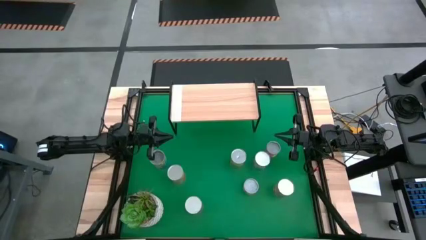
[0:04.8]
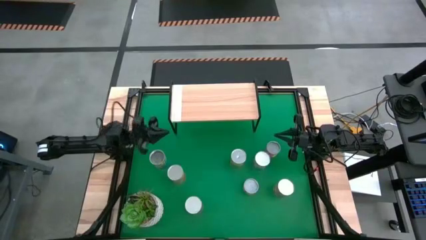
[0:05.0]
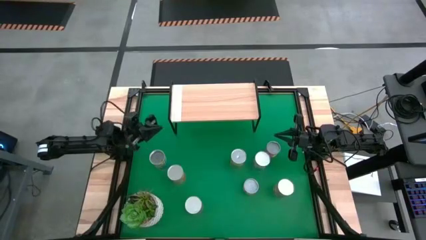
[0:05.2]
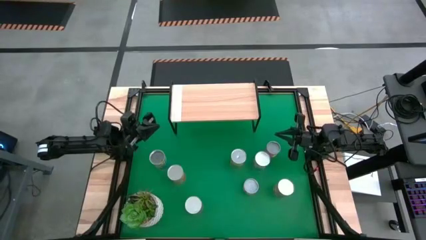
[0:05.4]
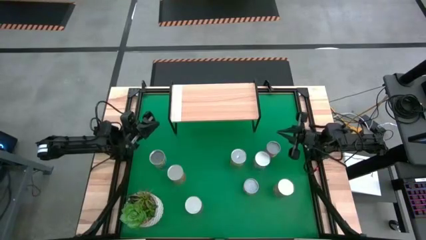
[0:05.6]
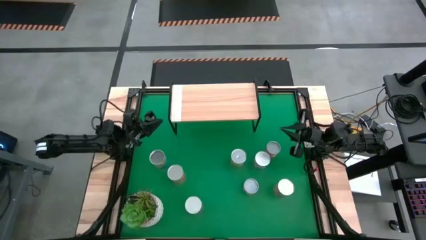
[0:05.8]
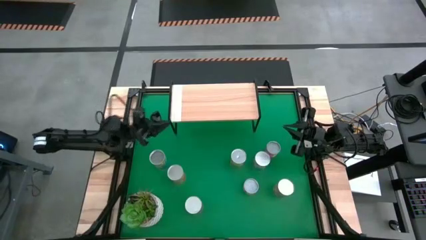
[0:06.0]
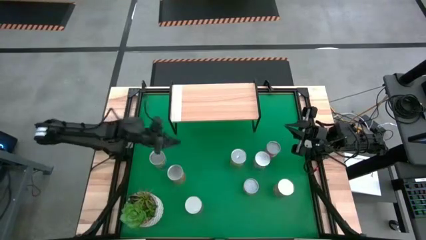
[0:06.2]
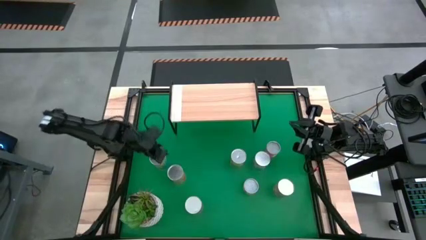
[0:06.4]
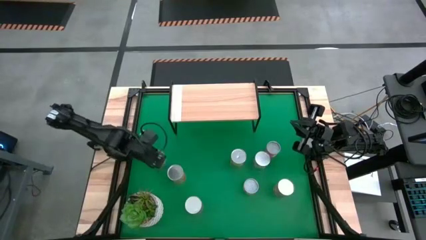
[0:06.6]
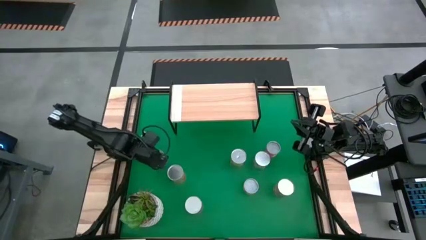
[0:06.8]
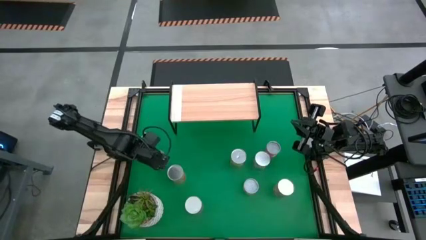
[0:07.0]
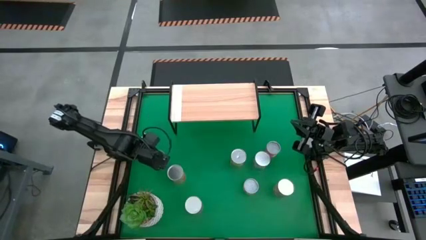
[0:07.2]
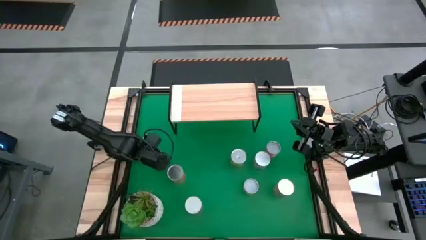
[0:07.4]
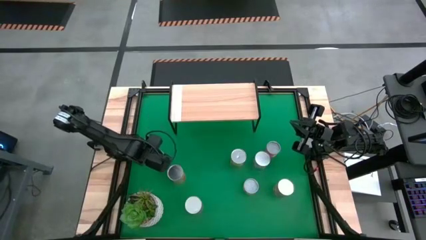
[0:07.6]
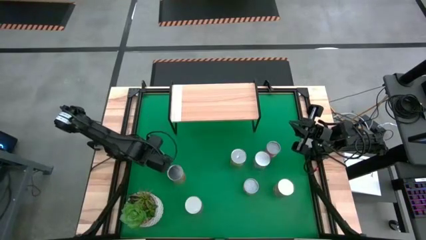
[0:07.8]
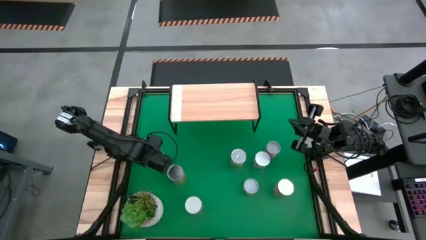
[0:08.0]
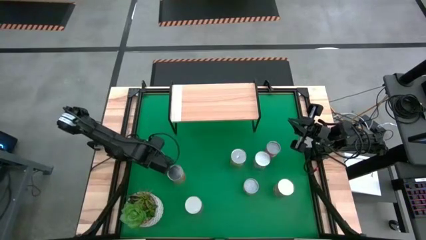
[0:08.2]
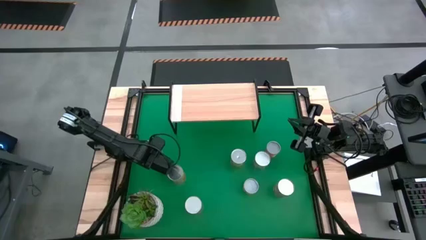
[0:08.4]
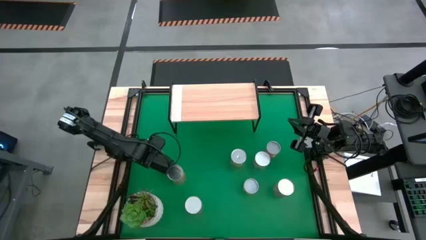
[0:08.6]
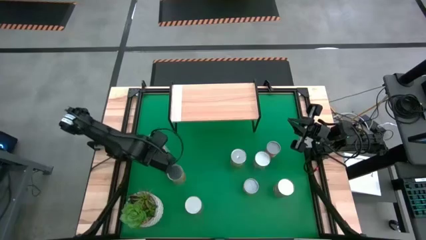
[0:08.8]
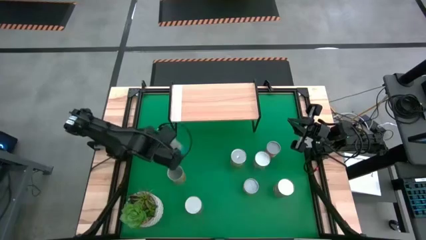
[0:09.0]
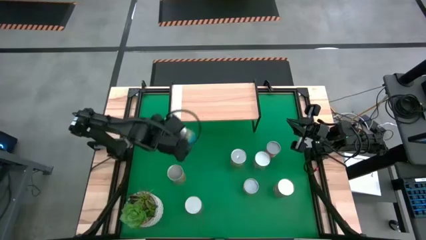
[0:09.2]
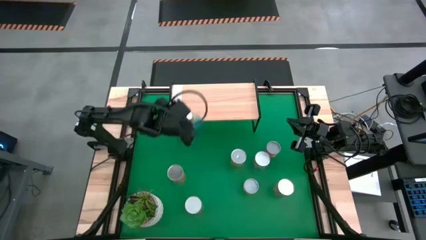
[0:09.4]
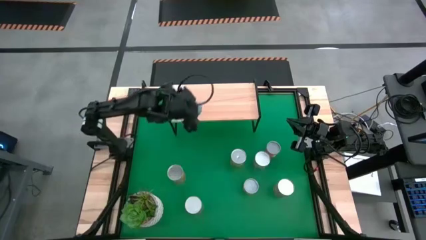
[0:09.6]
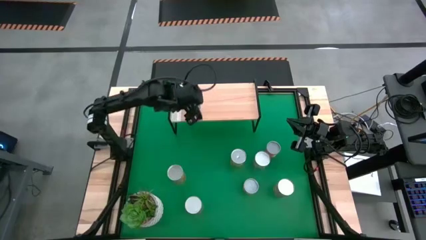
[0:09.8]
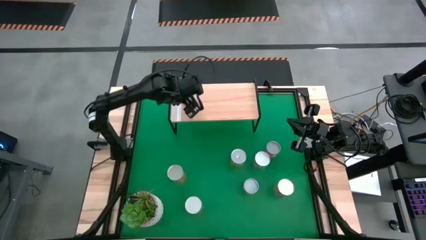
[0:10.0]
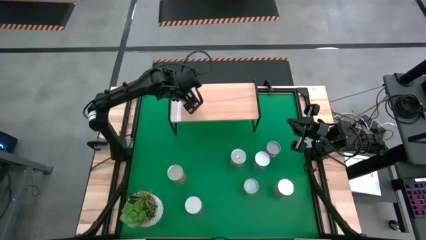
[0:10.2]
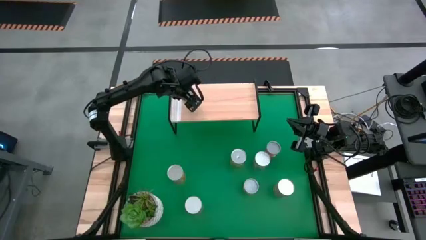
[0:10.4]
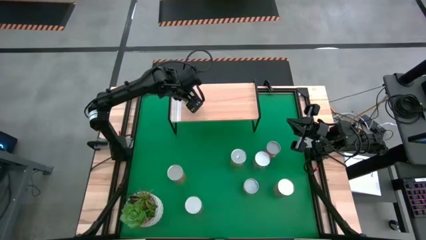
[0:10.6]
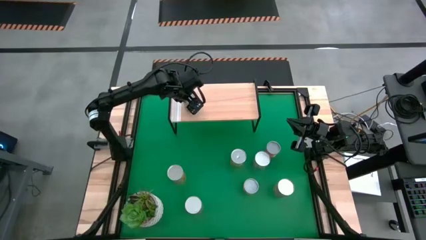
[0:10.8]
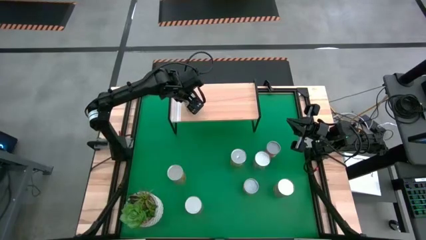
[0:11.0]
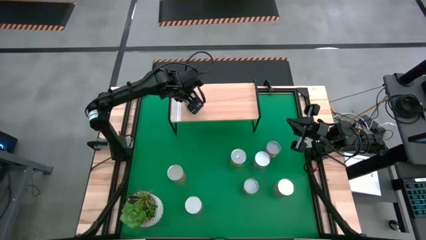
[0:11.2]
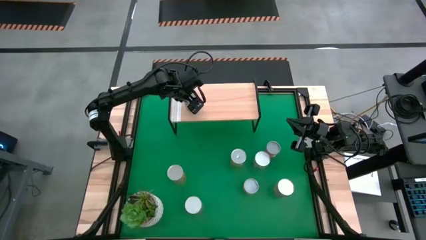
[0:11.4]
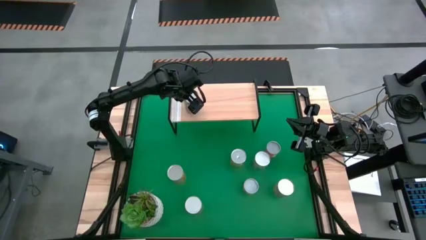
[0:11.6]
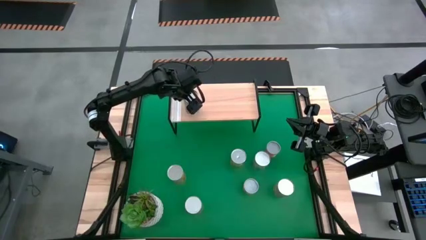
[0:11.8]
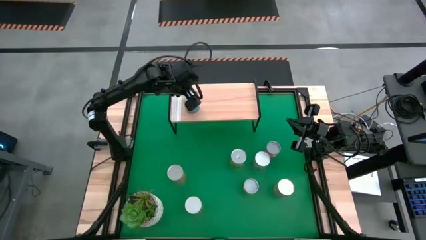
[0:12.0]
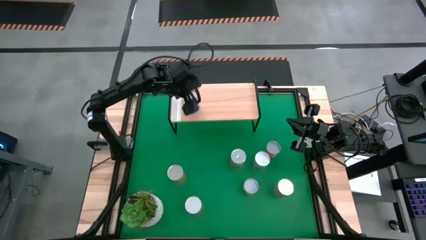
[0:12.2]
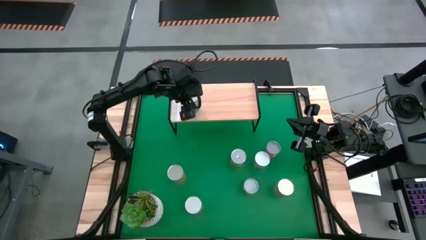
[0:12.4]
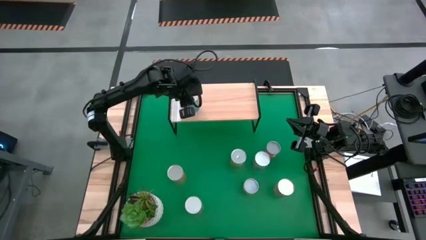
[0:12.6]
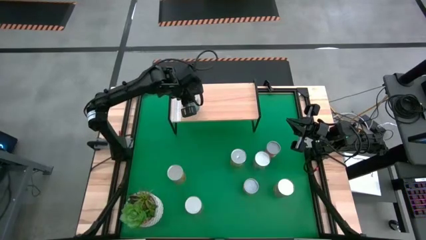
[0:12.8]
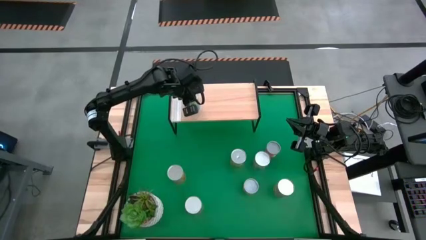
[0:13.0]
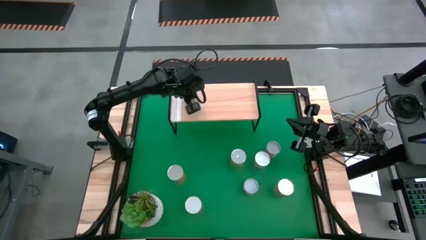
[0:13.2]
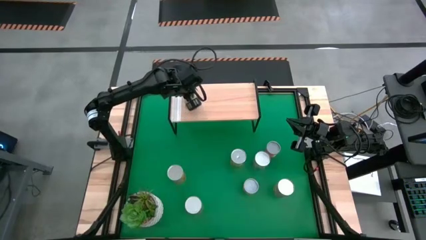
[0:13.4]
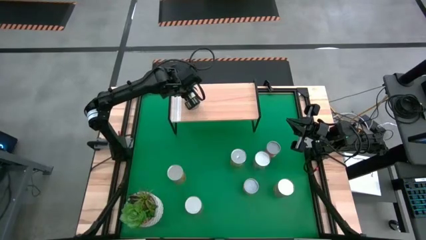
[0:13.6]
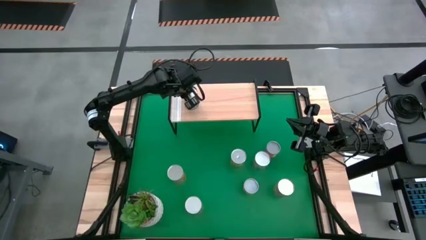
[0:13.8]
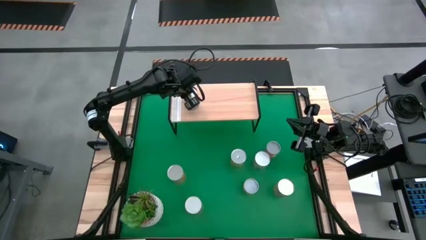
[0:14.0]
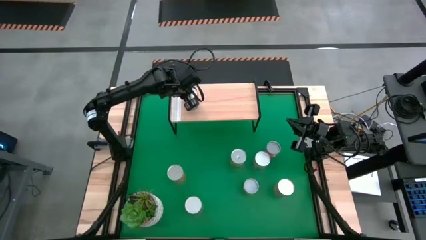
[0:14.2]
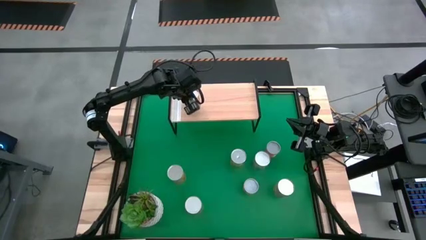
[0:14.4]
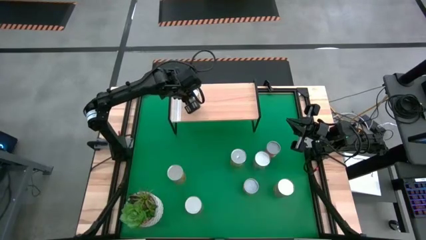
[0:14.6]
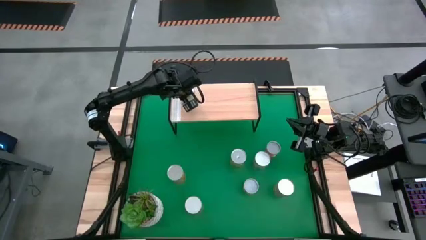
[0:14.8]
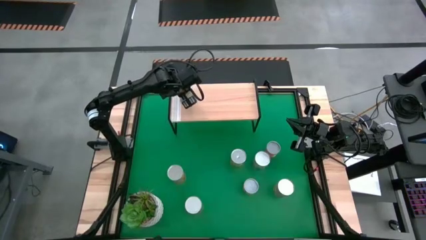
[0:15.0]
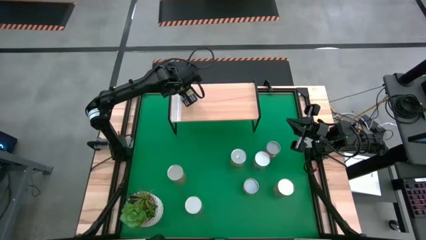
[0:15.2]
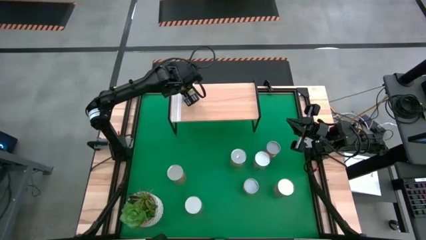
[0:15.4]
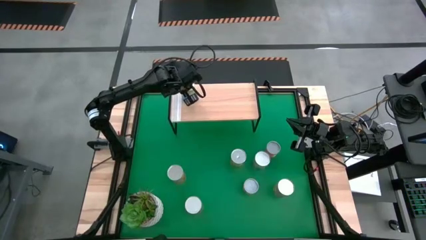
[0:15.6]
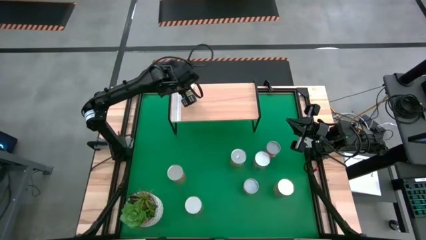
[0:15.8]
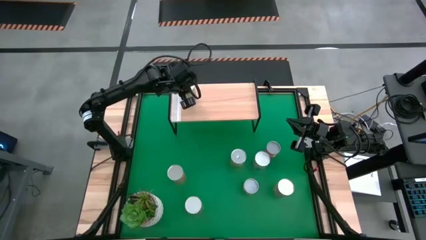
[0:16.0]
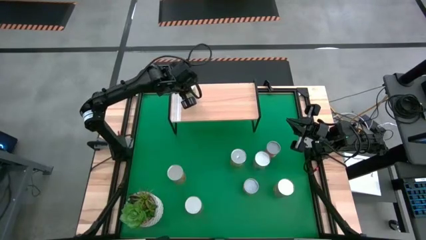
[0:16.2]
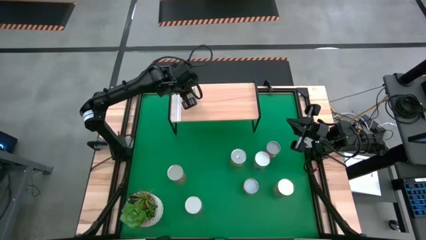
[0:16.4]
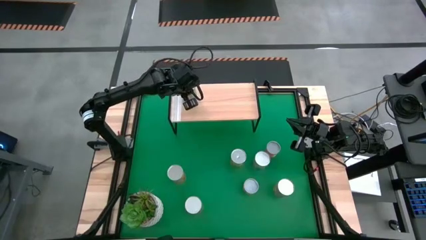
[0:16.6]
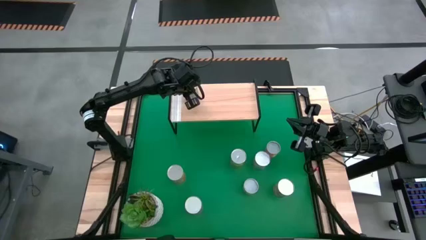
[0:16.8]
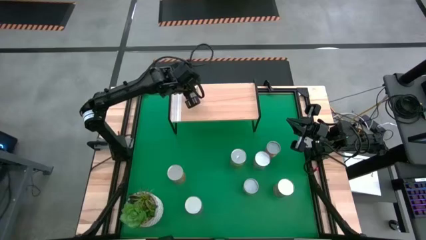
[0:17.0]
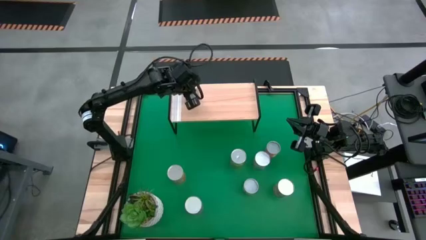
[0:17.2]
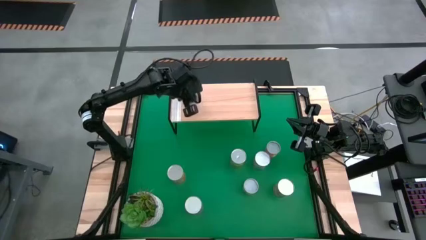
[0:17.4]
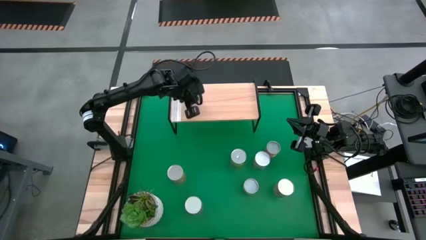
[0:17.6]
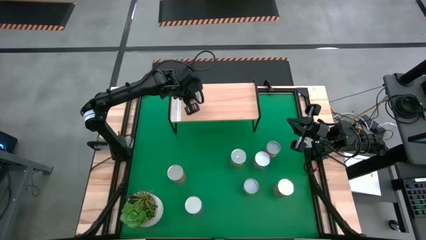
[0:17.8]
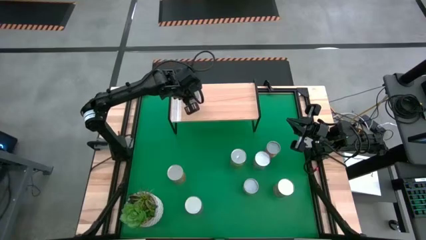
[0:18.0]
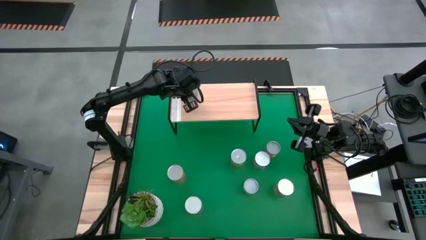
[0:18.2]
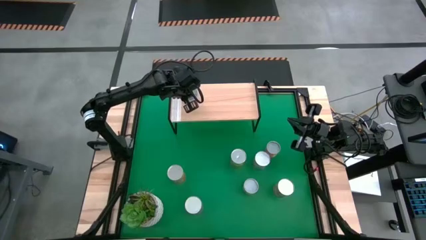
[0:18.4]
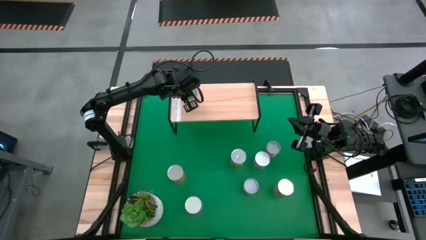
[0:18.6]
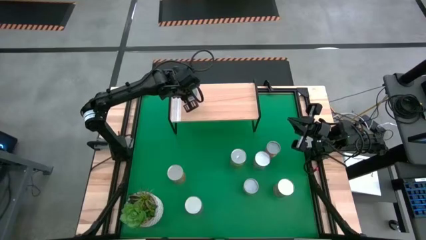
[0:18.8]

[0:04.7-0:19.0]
Task: Pick and place cans onto a shelf
Put the left canned cherries on the shelf

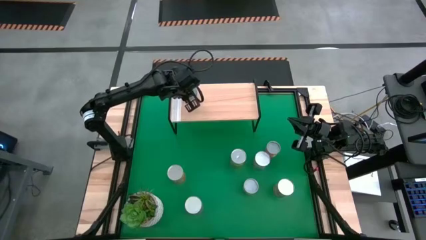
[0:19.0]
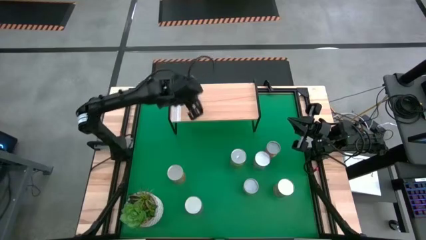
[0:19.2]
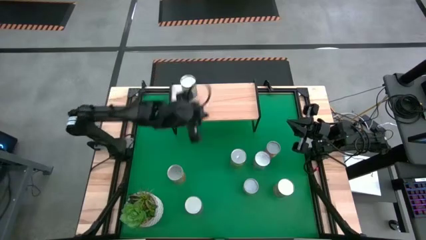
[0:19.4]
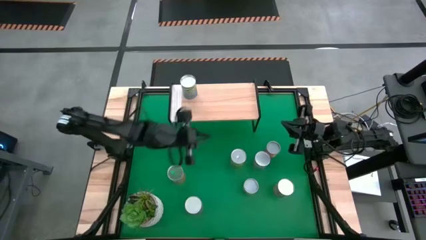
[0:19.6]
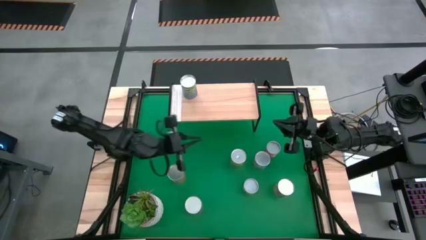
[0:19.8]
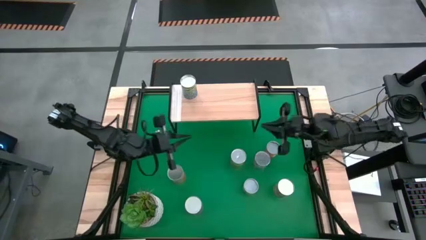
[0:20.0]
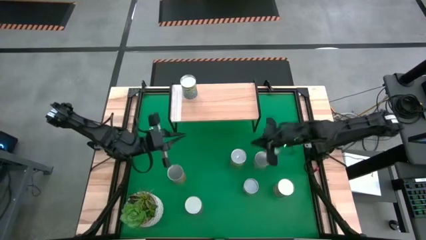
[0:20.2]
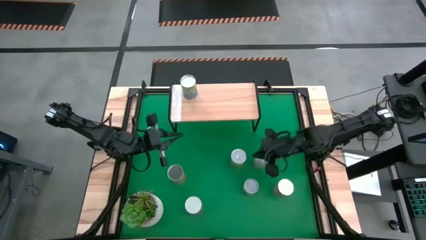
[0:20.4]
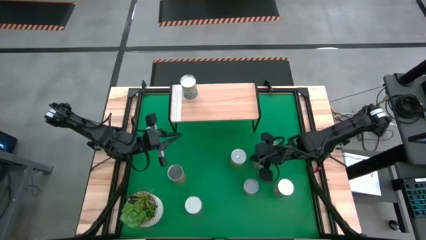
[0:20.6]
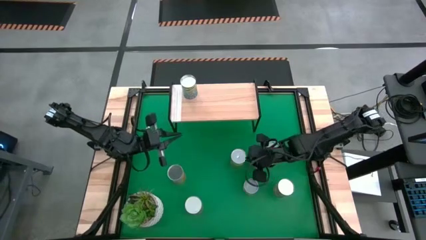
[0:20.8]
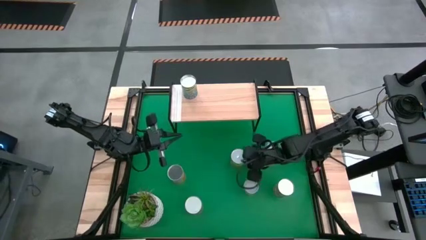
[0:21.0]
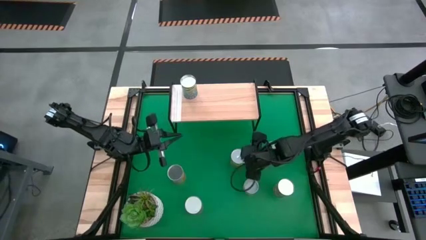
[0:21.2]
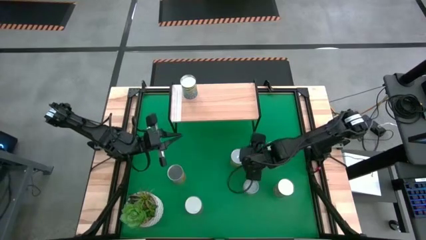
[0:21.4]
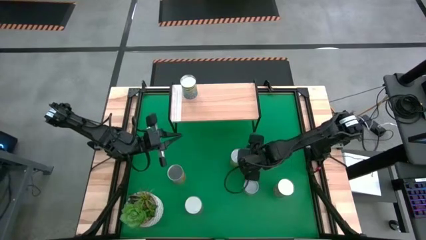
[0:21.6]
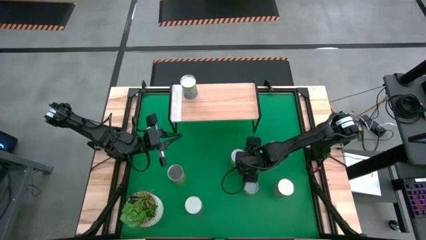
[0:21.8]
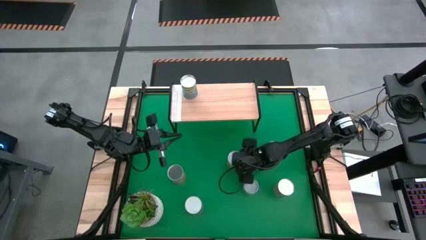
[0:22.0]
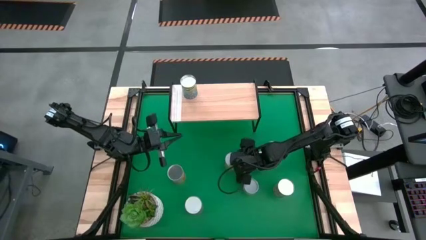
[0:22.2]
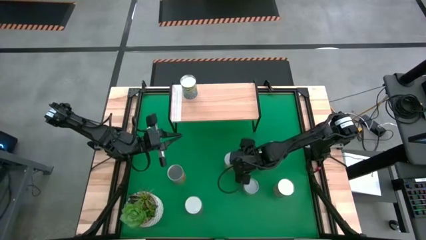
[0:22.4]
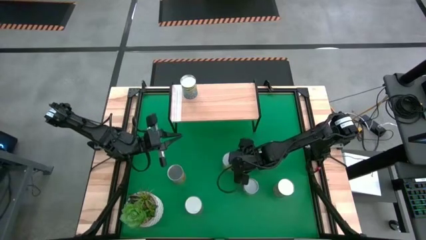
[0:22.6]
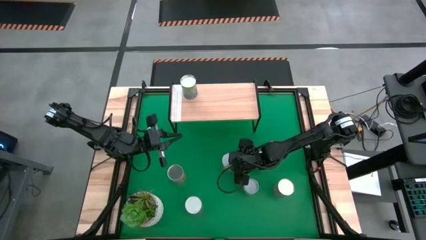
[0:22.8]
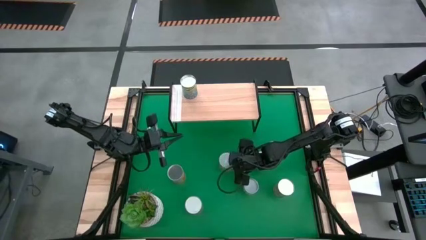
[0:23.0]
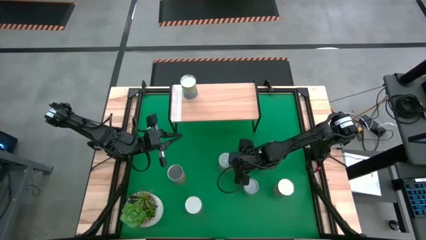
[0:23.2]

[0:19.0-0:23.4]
Put the canned oranges on the shelf
